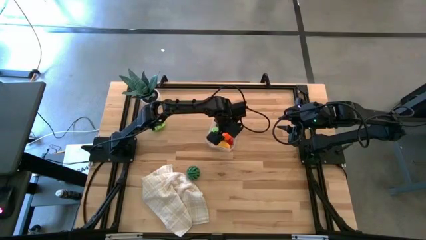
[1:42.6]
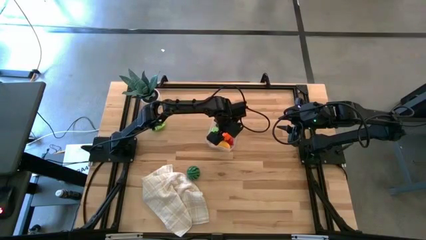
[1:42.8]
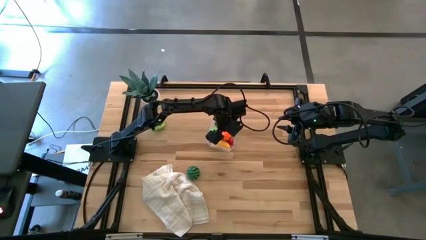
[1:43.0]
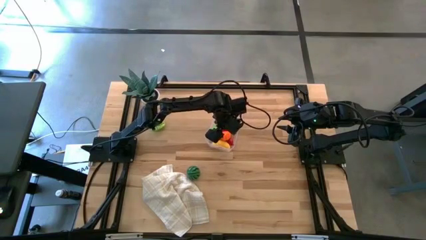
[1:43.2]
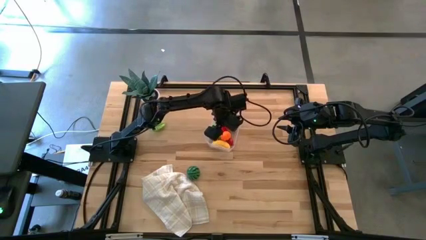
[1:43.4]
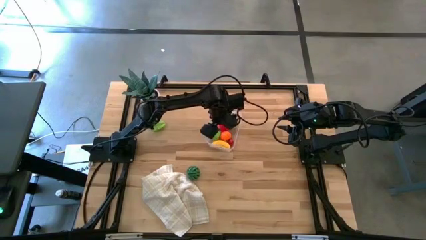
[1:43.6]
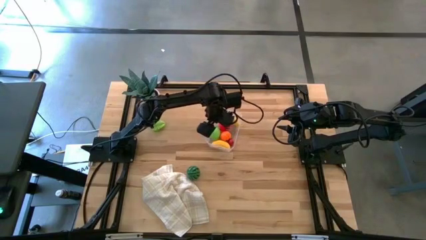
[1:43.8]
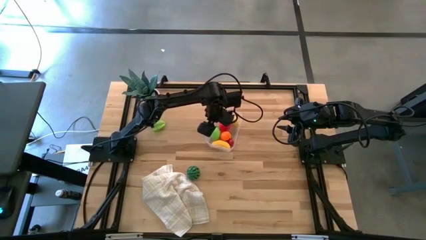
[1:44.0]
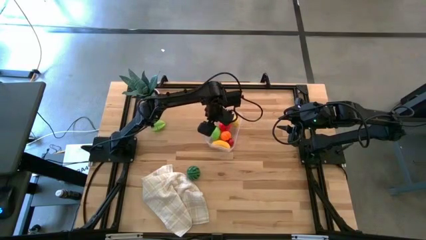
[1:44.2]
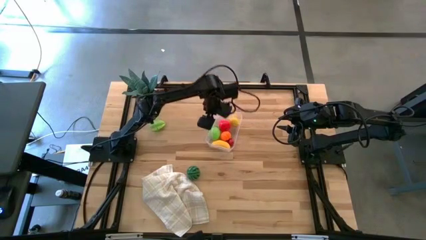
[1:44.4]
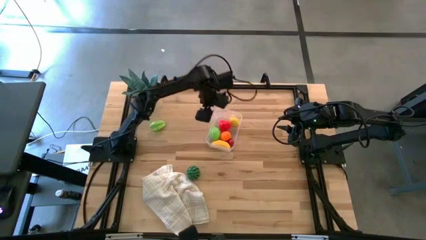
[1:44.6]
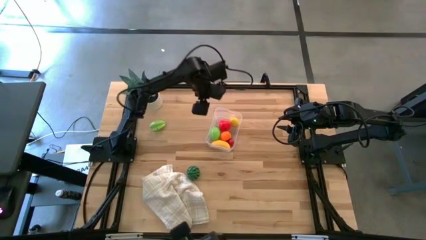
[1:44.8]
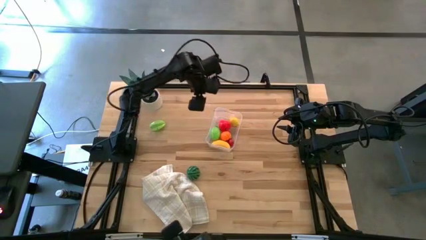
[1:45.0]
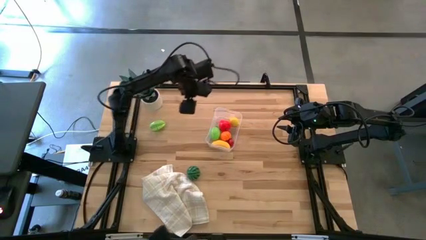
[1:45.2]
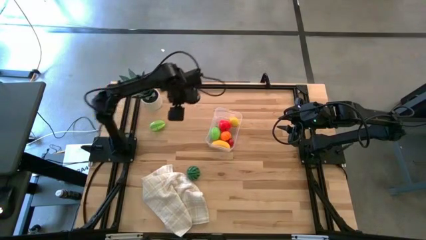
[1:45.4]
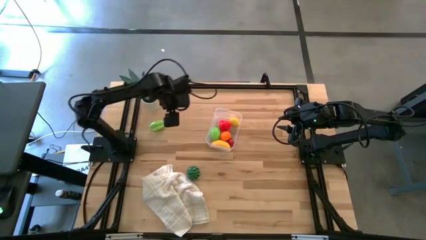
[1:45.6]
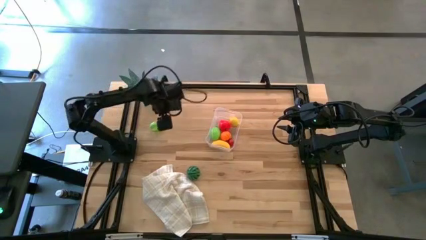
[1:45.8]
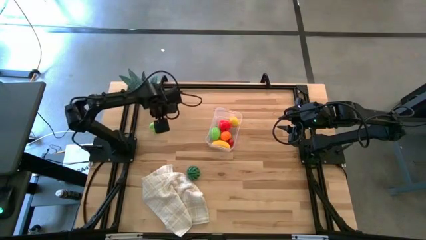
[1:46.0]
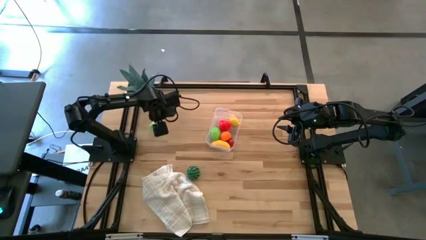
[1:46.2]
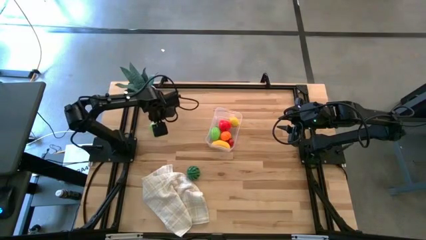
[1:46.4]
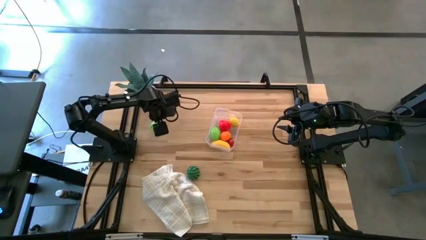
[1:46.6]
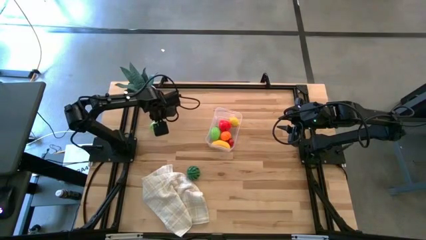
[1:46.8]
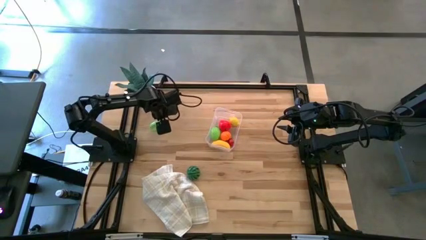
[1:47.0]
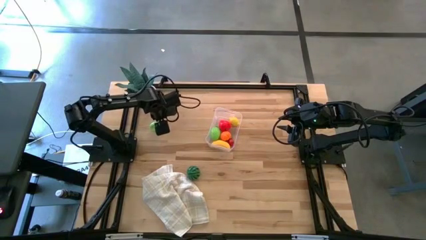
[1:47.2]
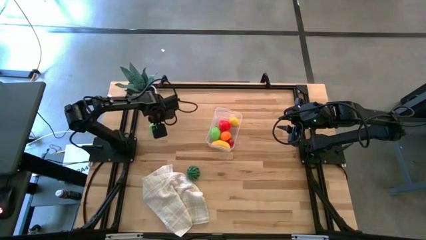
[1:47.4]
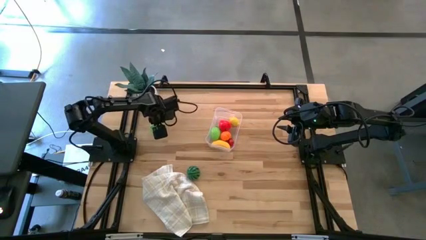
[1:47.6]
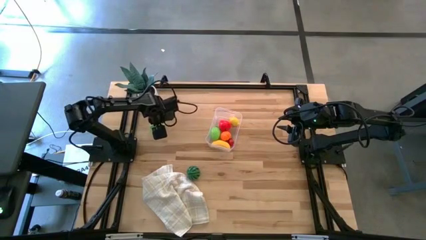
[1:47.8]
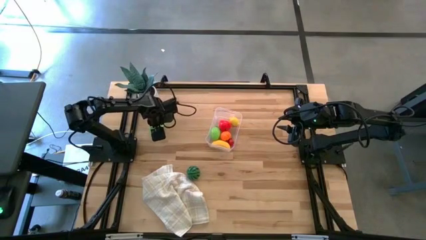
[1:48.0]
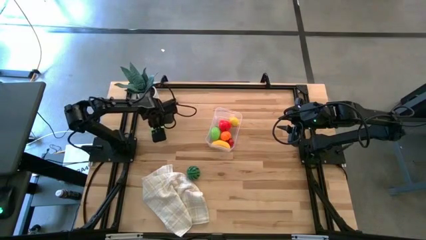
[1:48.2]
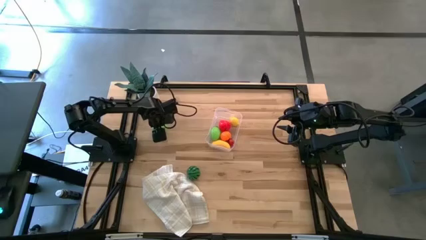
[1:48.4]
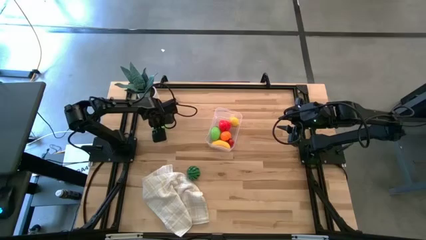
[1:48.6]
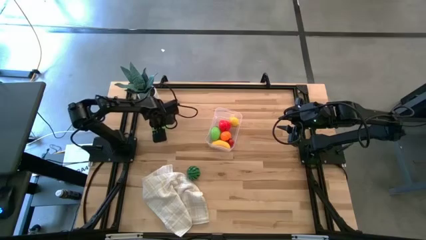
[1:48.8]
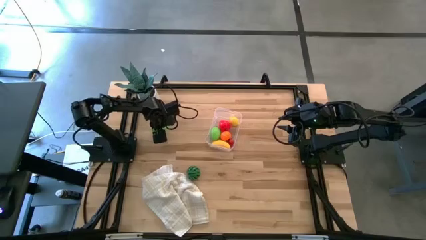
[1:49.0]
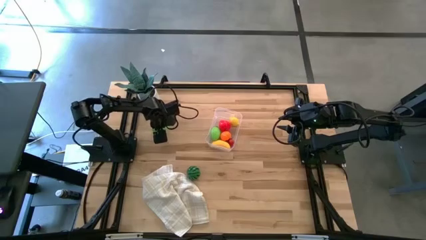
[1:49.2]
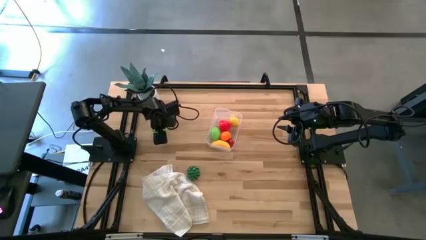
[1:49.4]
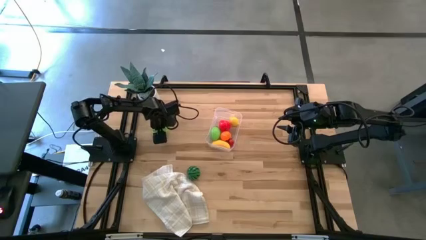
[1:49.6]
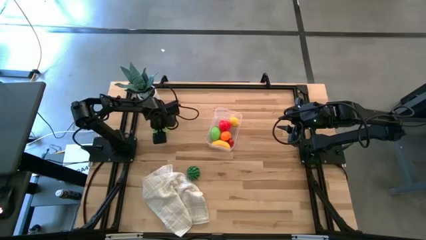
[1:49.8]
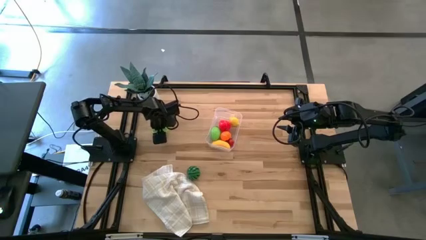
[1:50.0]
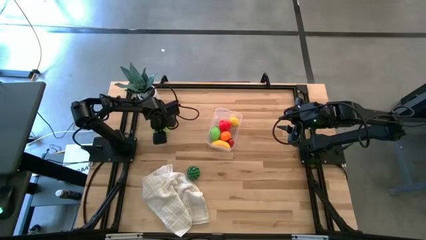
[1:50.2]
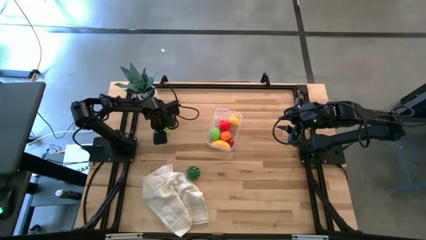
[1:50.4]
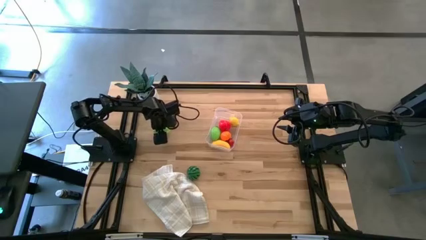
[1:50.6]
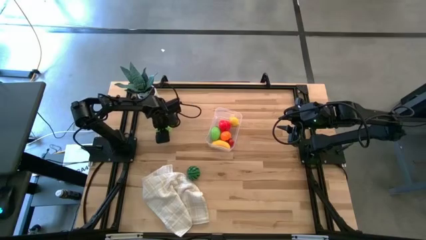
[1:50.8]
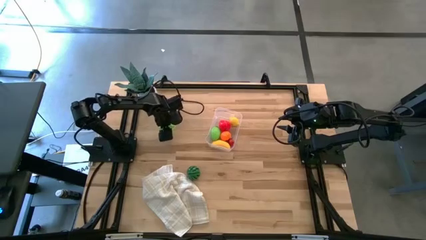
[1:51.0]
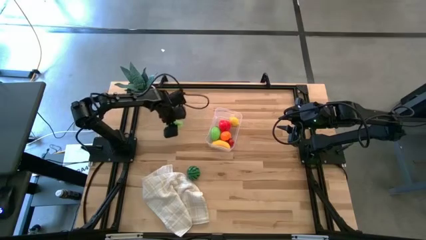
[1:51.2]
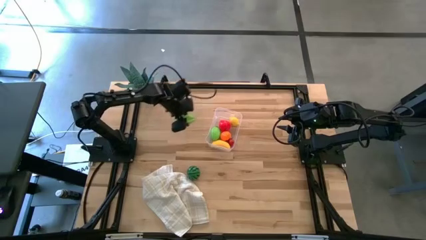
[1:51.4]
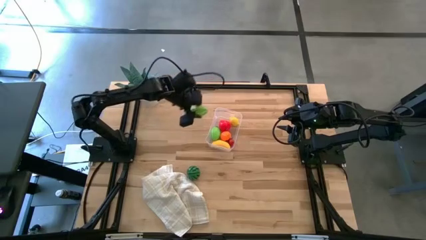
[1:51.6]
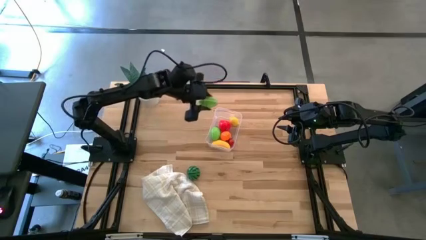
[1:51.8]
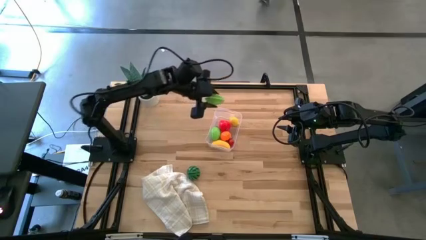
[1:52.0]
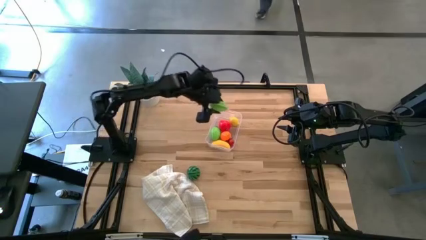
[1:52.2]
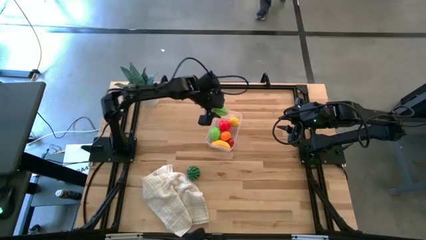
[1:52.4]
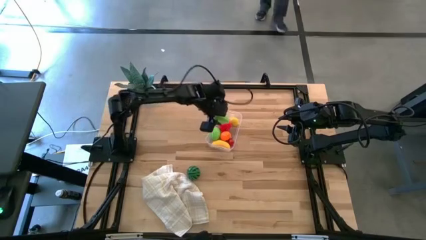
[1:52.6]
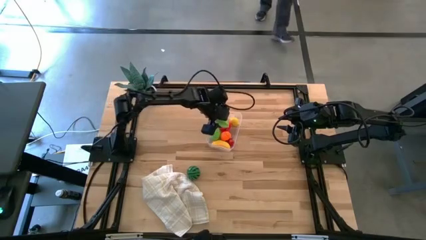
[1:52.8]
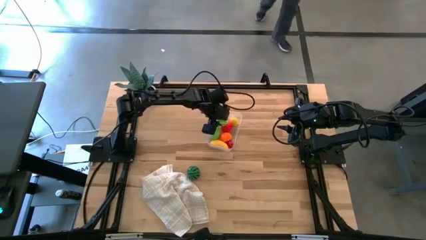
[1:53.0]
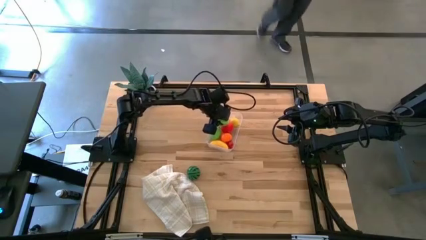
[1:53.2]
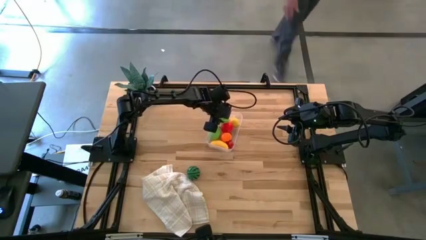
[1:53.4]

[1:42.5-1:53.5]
Task: Pick and placing Produce into tupperware
Put the green starfruit into the transparent bin
